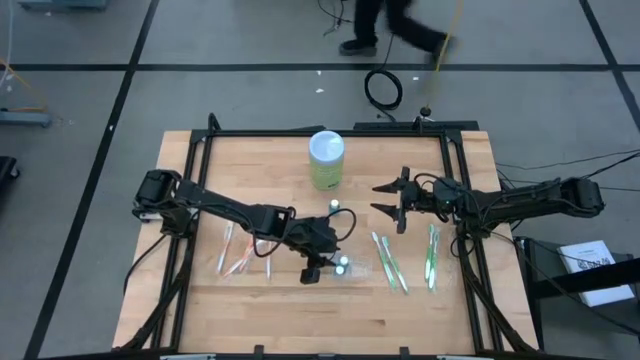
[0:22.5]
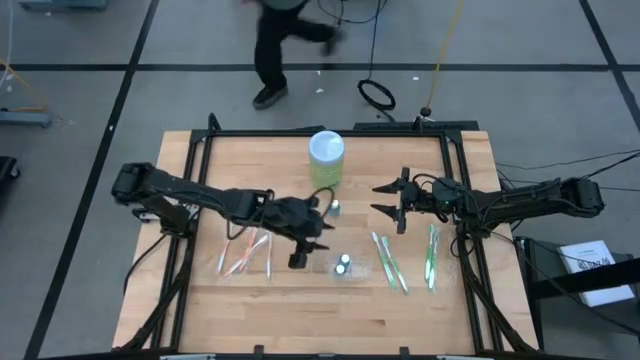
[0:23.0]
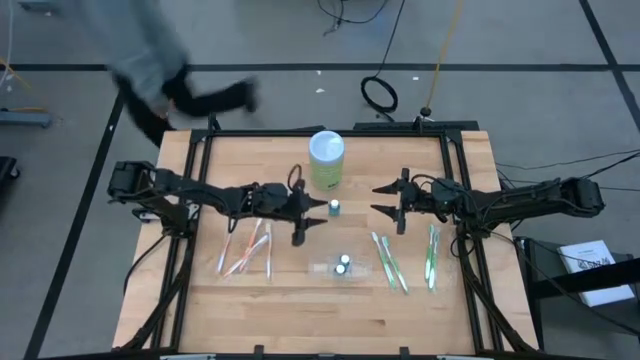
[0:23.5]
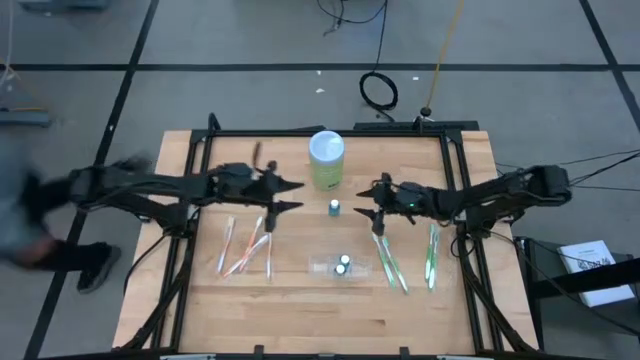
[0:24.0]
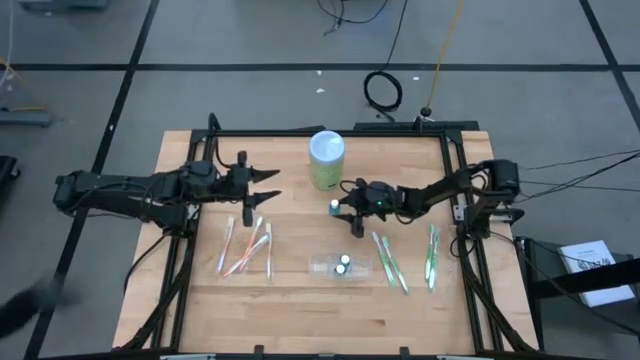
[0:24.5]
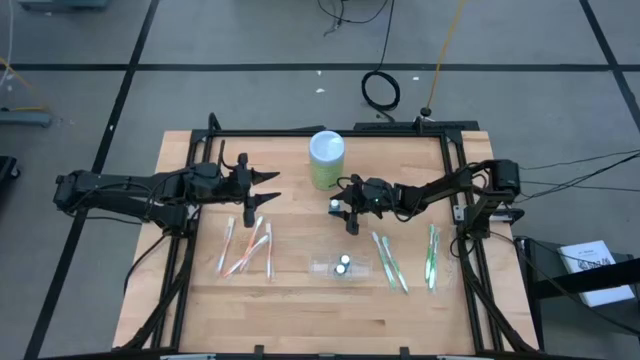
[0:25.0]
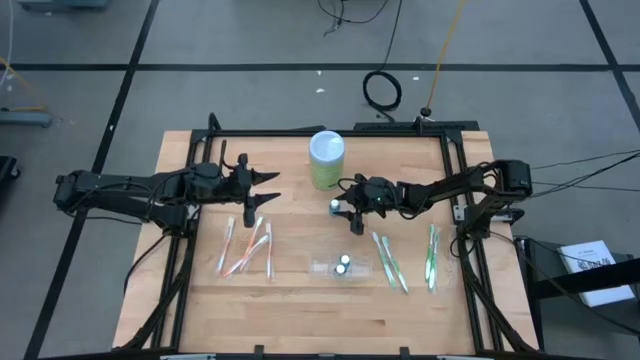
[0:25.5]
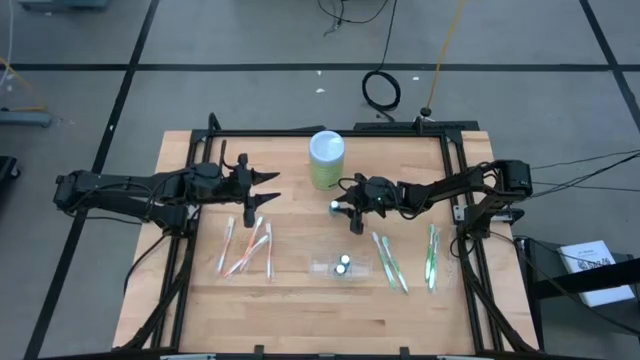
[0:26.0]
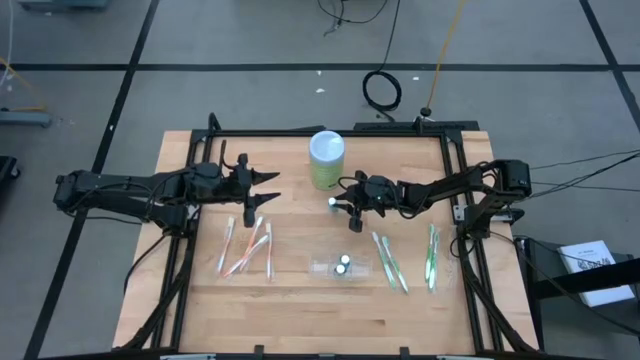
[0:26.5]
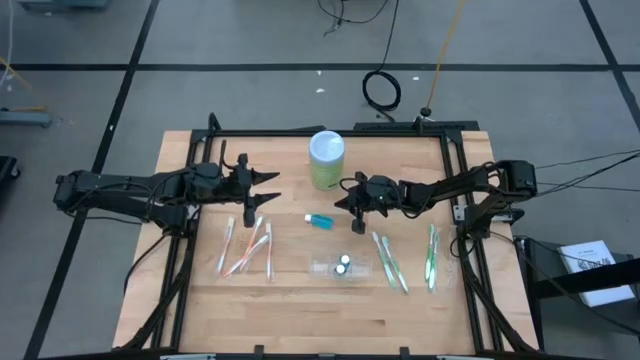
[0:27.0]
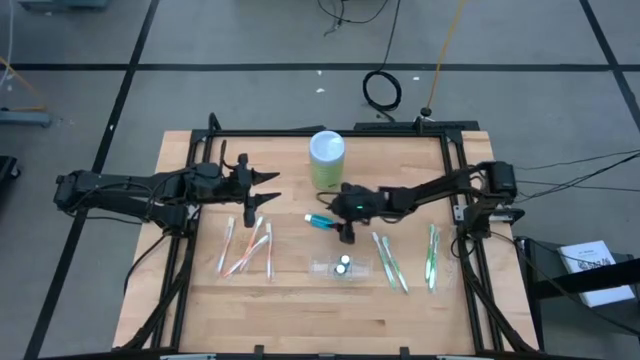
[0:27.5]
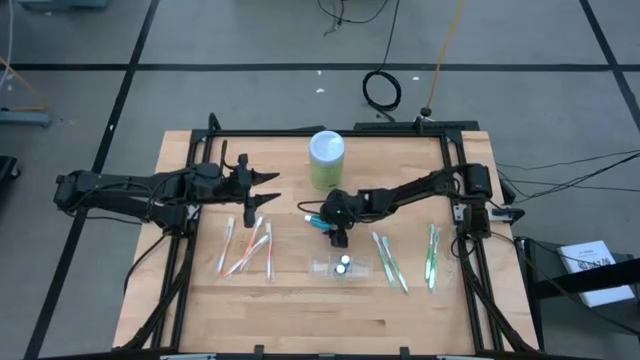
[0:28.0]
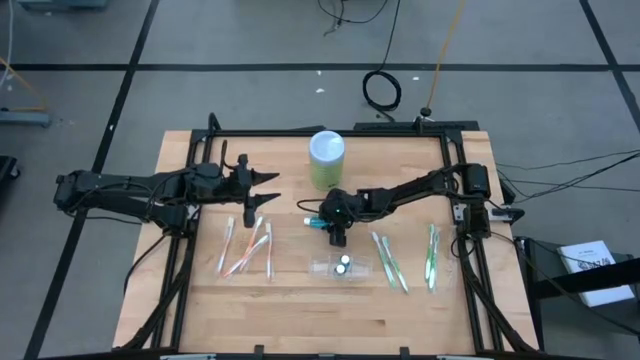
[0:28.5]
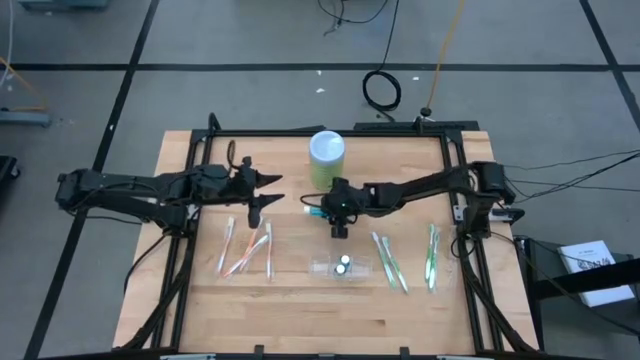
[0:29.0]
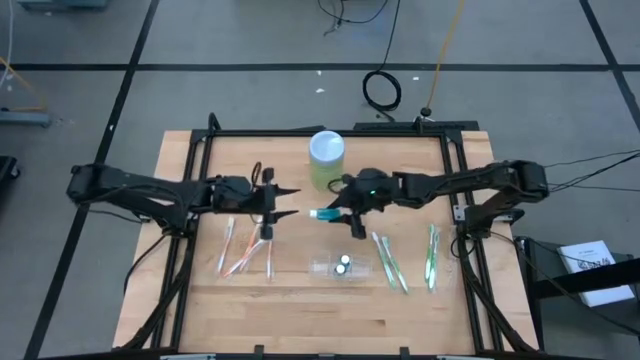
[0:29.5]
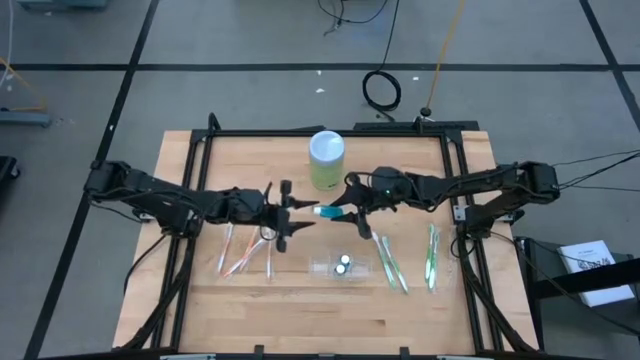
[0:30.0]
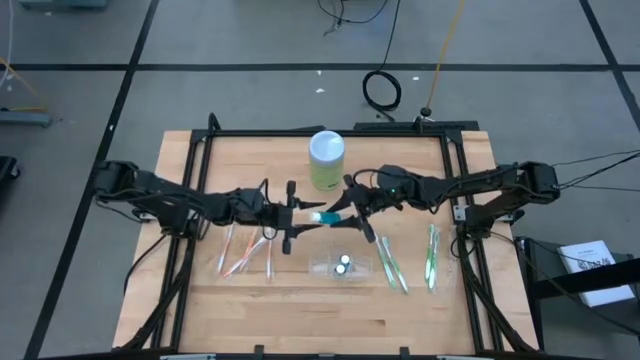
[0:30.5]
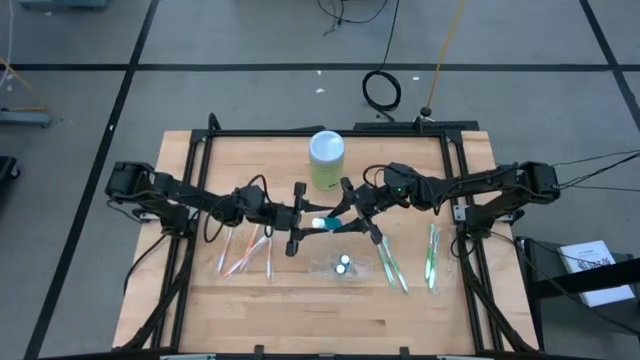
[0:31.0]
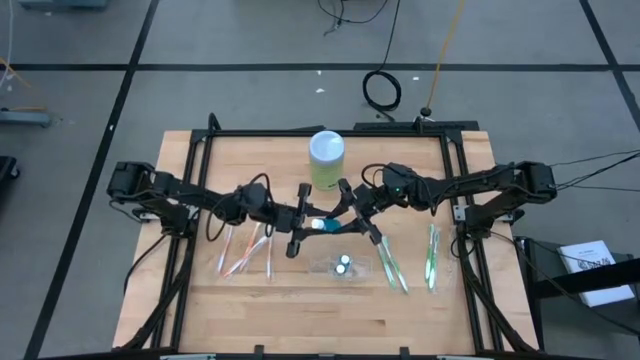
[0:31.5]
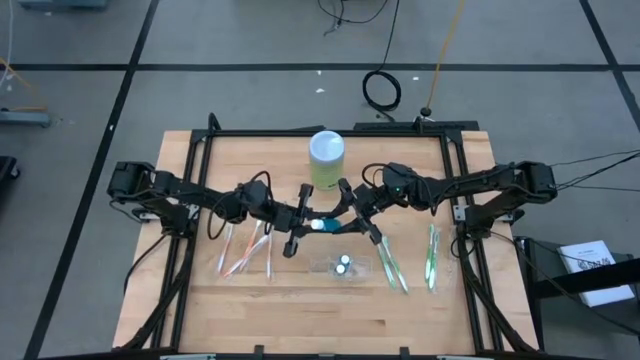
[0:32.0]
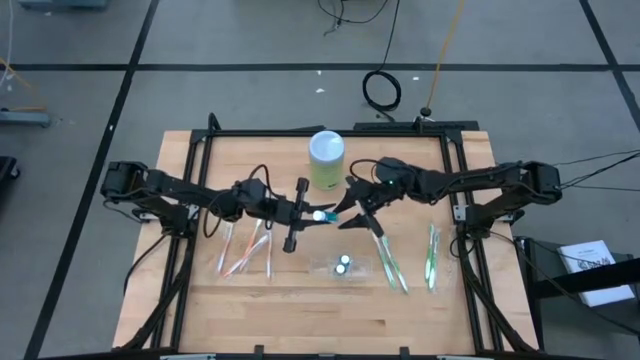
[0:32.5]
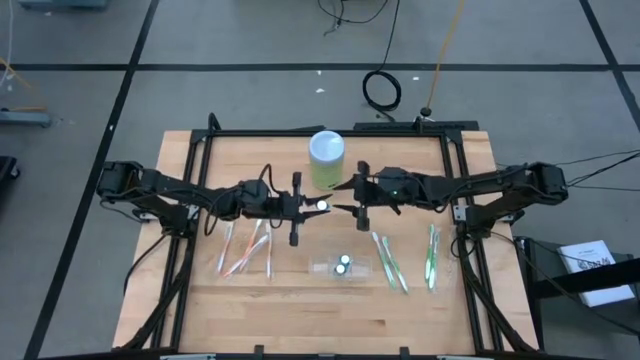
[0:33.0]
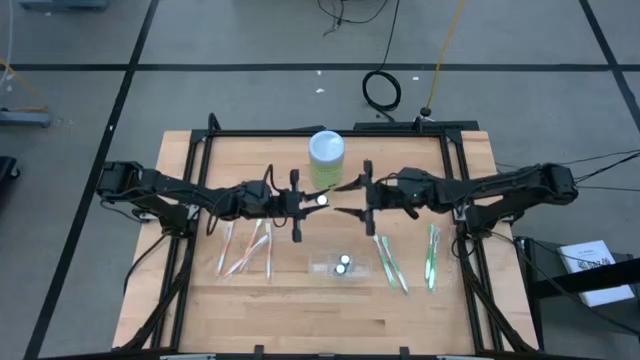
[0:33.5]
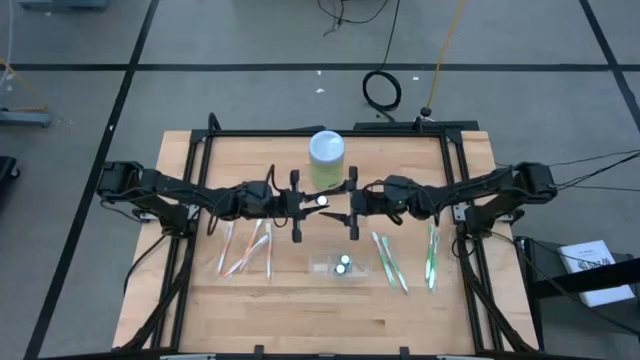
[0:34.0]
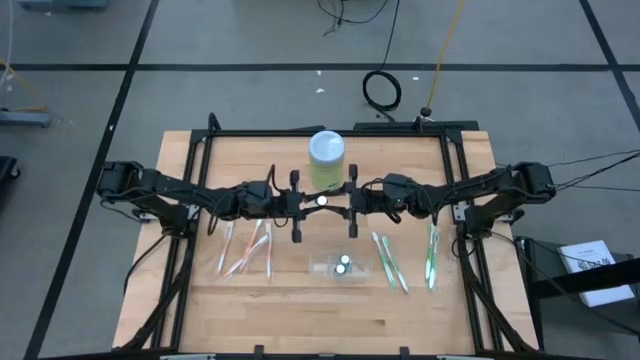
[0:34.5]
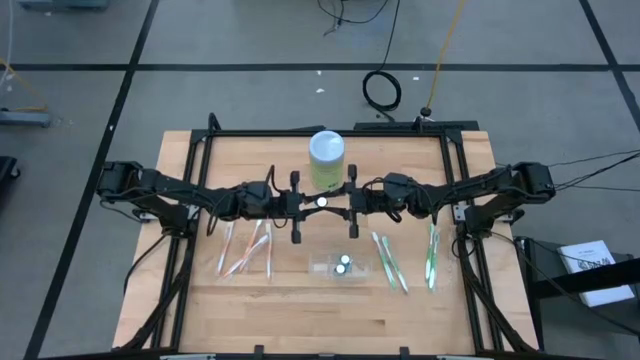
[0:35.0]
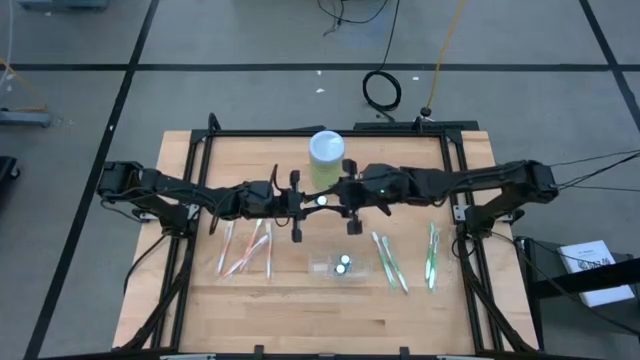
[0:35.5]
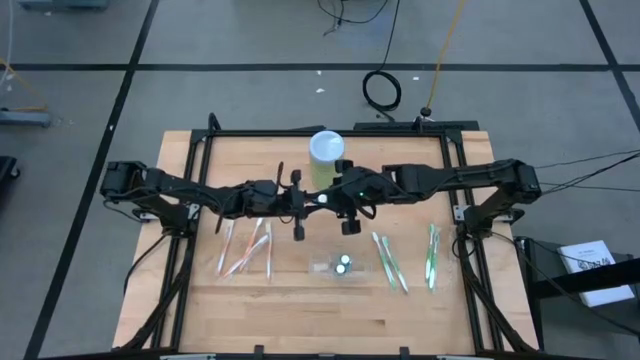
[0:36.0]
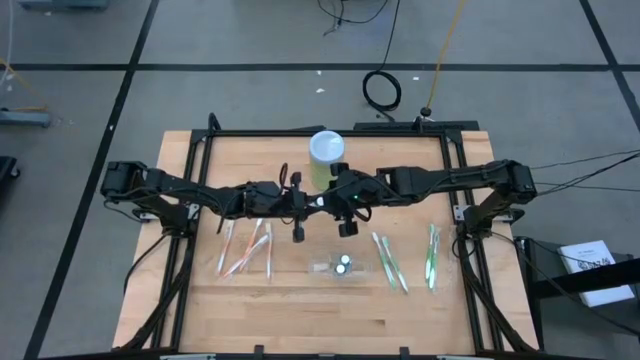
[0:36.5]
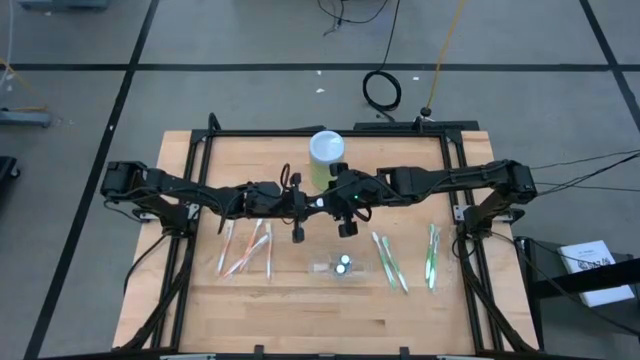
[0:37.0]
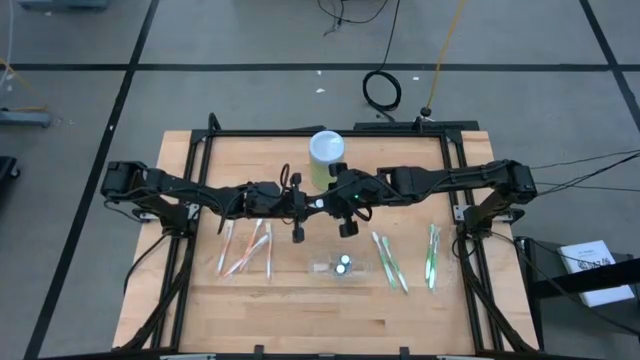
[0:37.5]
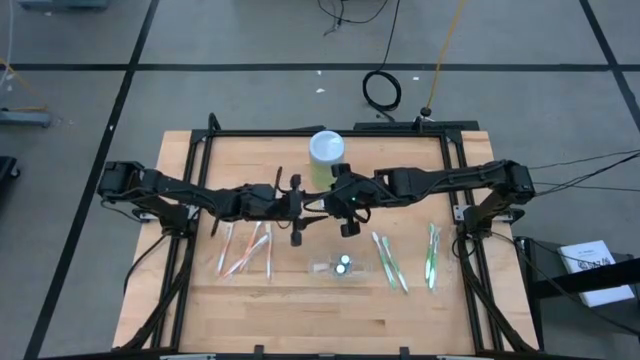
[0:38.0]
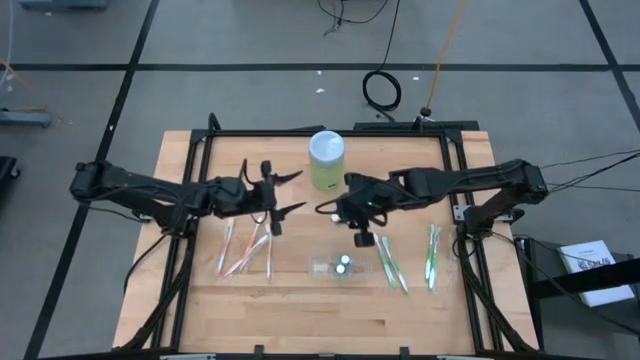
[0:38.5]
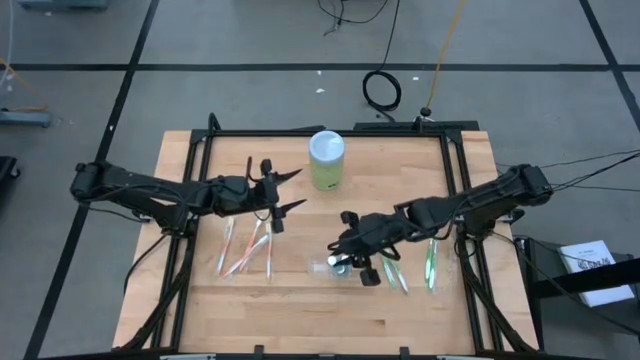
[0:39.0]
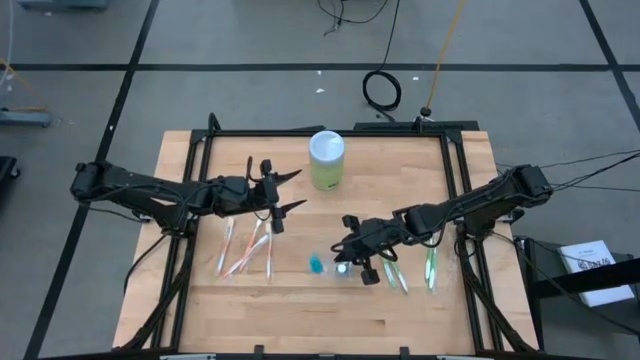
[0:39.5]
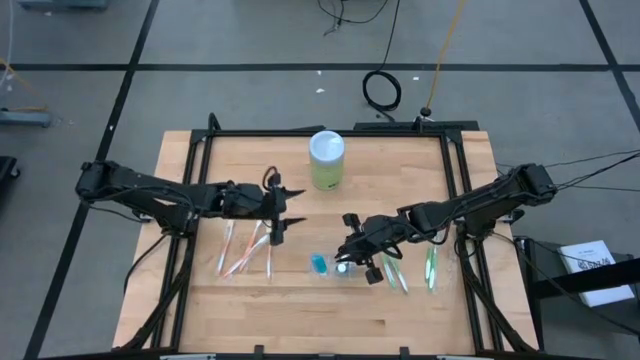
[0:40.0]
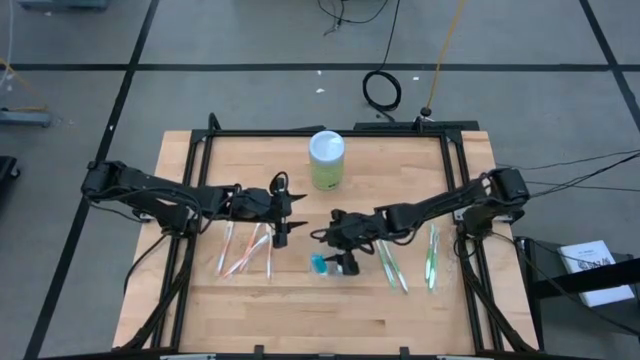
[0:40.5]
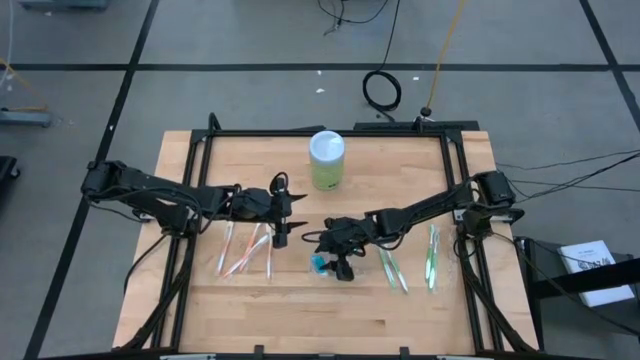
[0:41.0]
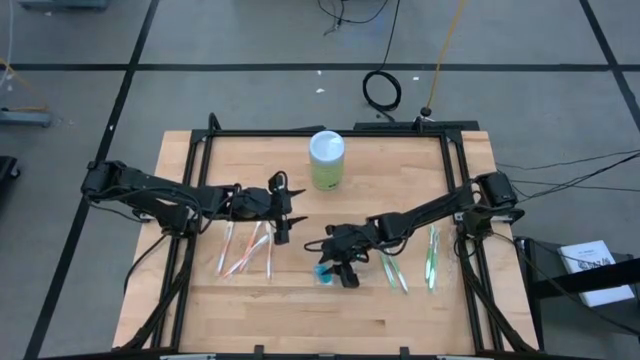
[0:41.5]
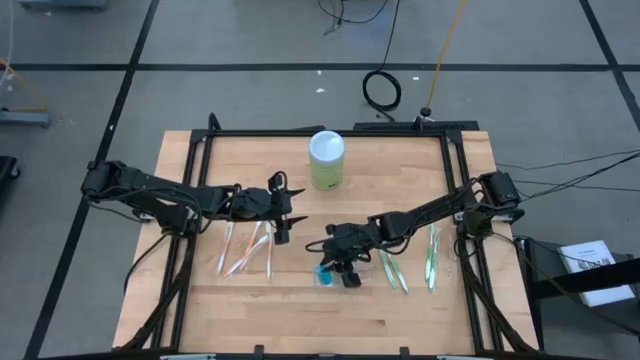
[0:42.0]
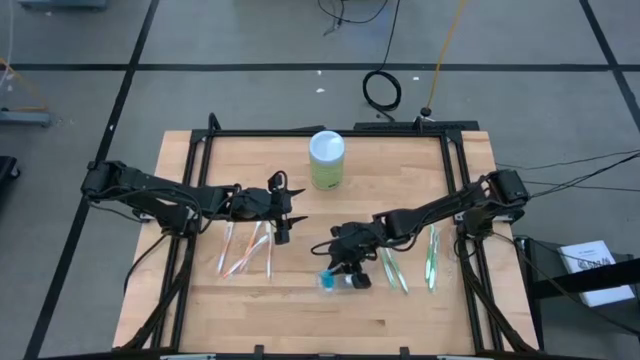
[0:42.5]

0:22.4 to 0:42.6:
Task: Pick & Place toothbrushing station
Put the mouthwash into the middle center of the transparent organizer

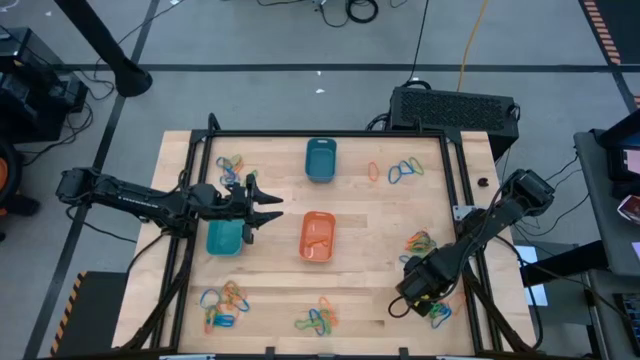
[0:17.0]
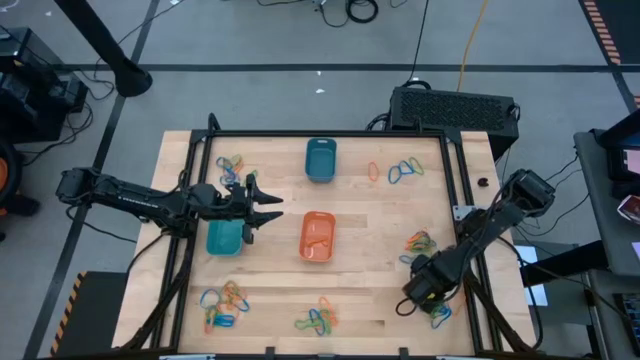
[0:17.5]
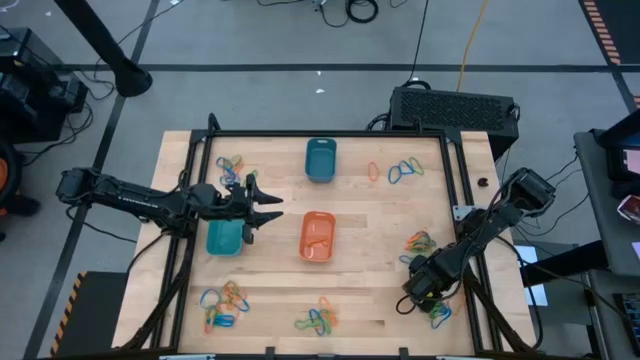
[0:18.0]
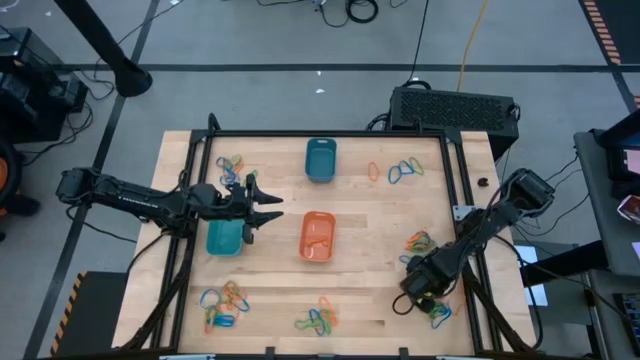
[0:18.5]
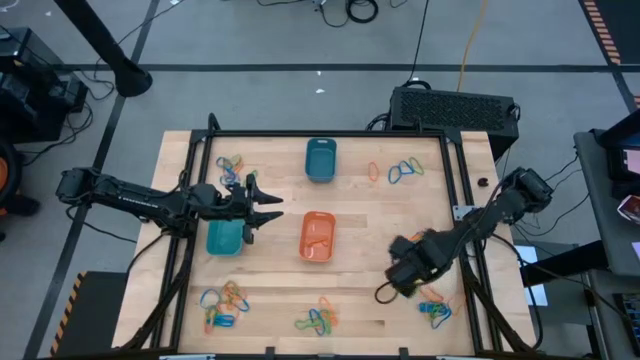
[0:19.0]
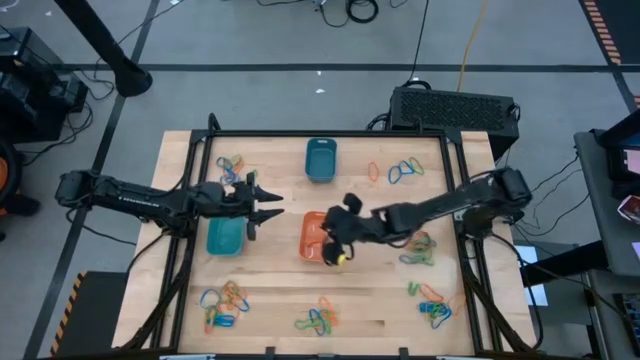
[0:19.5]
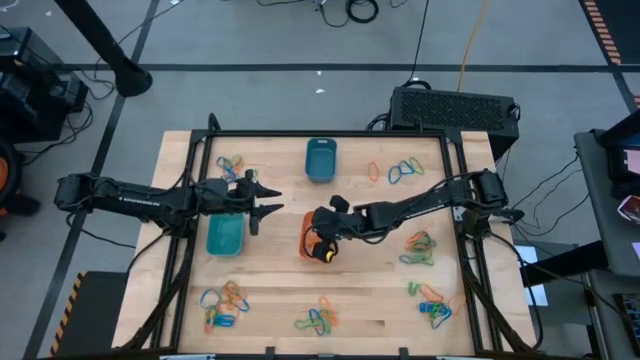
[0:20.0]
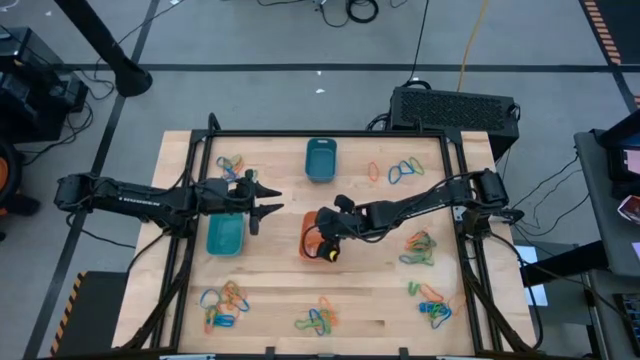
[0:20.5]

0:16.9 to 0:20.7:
Task: Sort rubber bands into baskets
Put the orange rubber band into the orange bin
